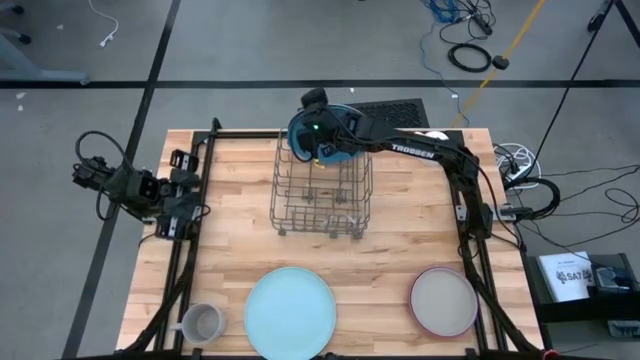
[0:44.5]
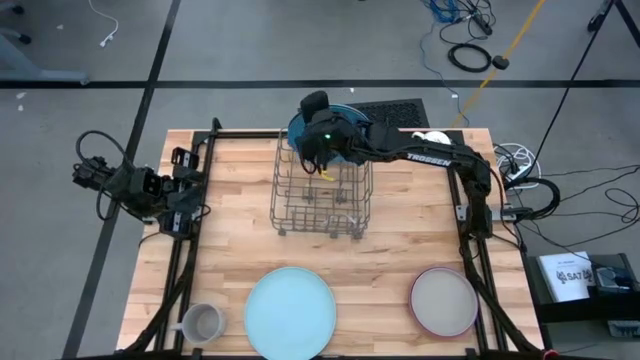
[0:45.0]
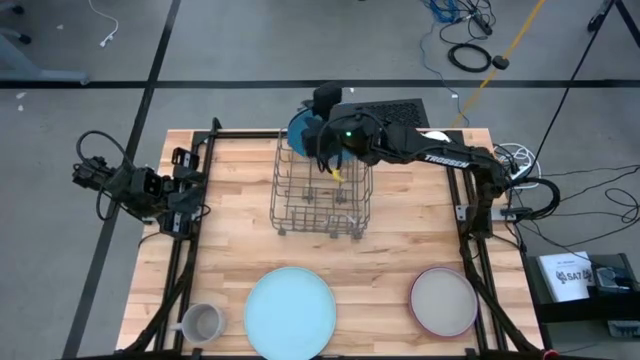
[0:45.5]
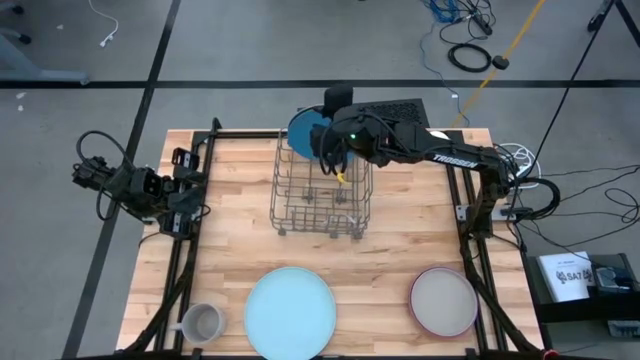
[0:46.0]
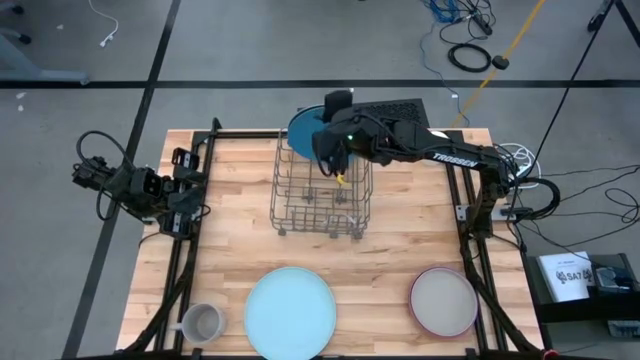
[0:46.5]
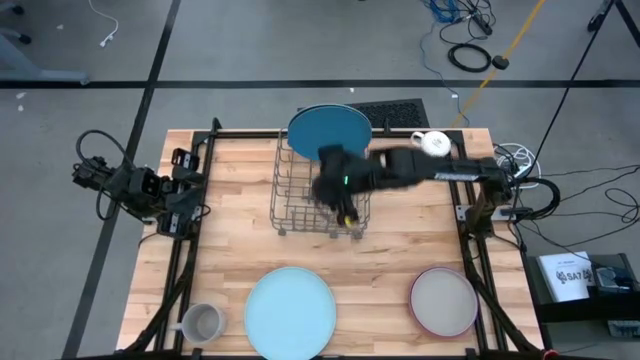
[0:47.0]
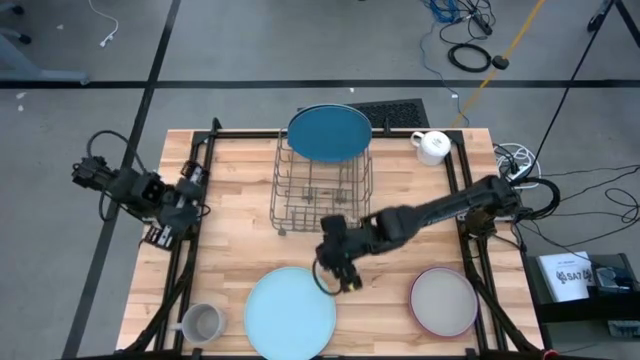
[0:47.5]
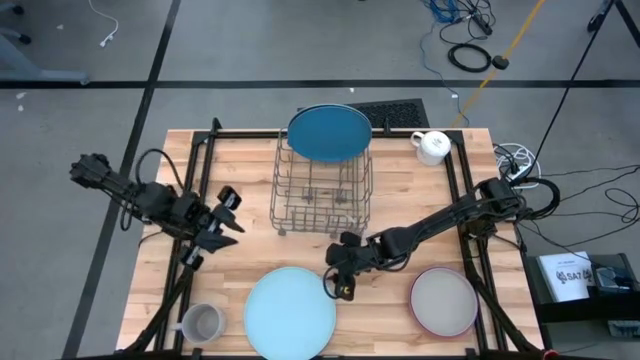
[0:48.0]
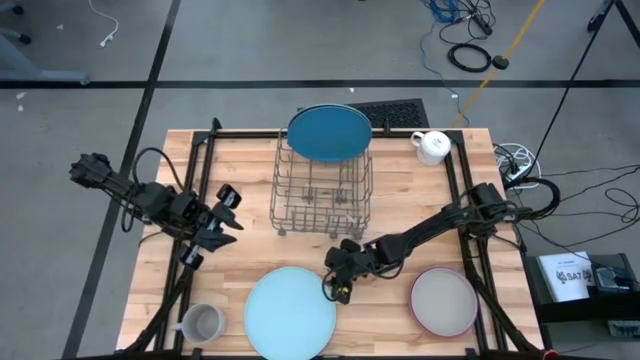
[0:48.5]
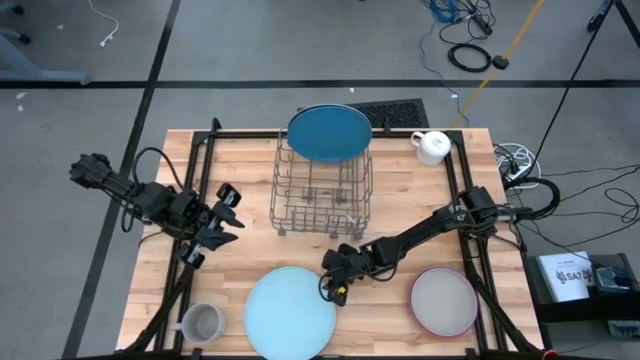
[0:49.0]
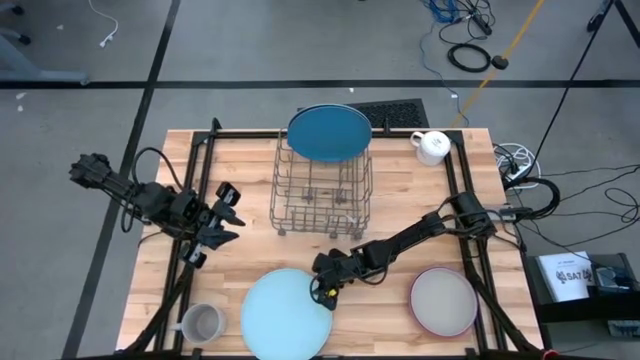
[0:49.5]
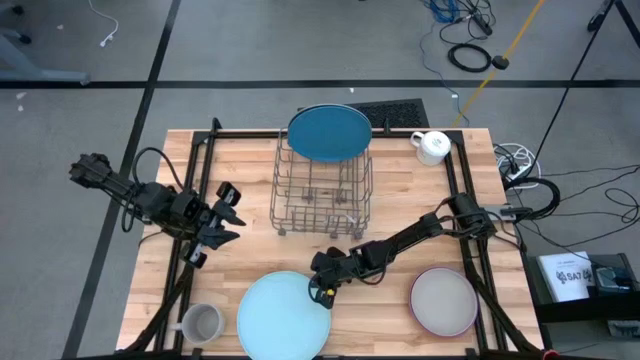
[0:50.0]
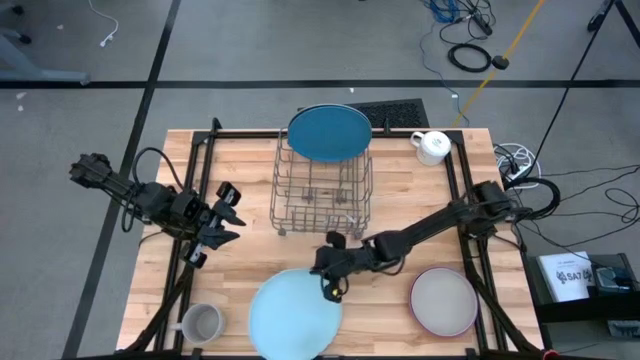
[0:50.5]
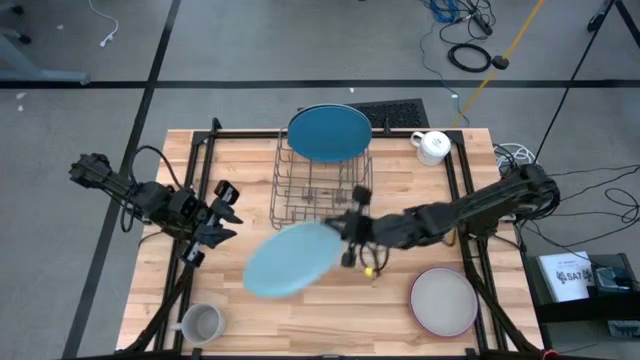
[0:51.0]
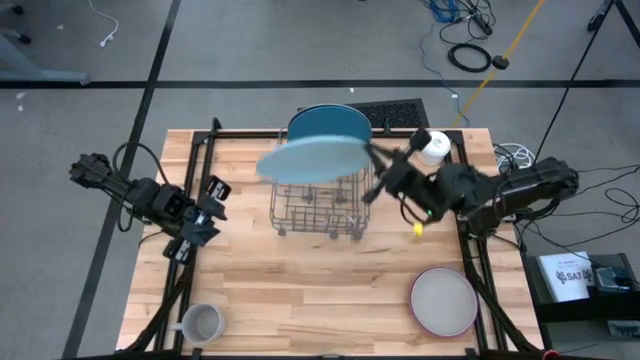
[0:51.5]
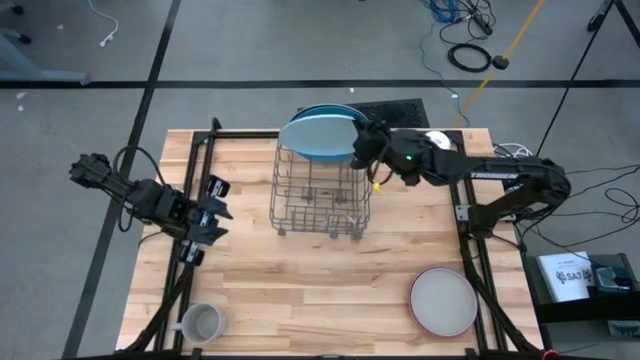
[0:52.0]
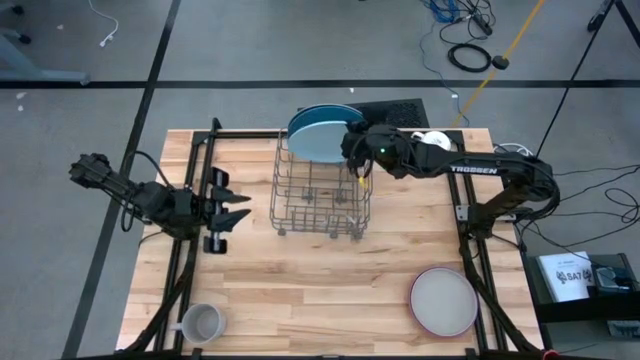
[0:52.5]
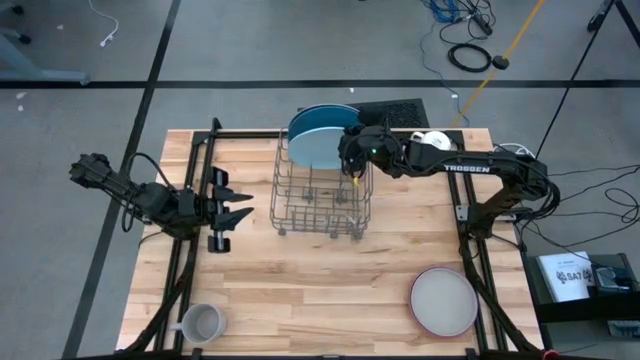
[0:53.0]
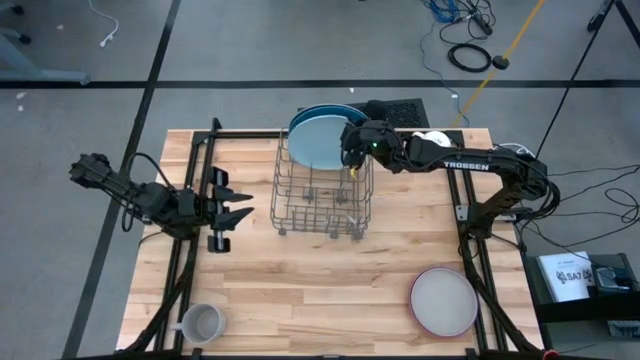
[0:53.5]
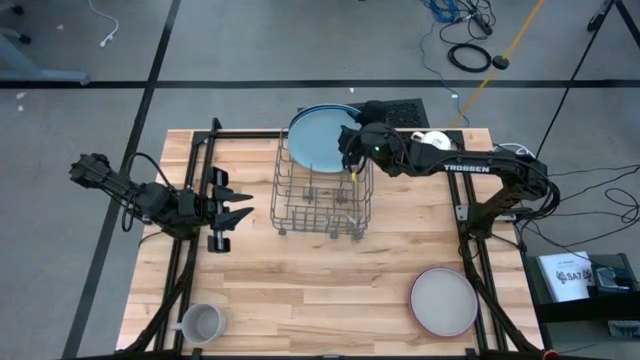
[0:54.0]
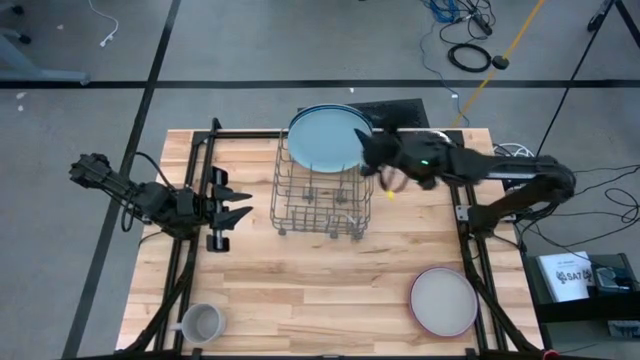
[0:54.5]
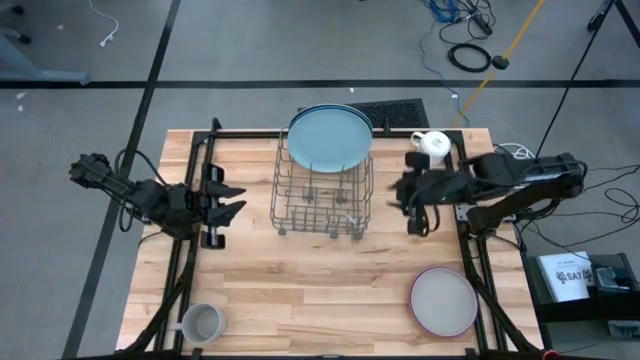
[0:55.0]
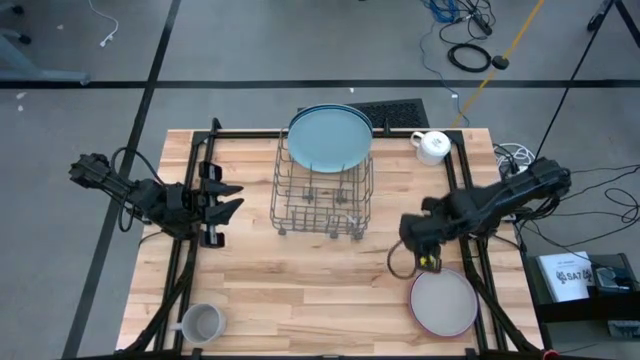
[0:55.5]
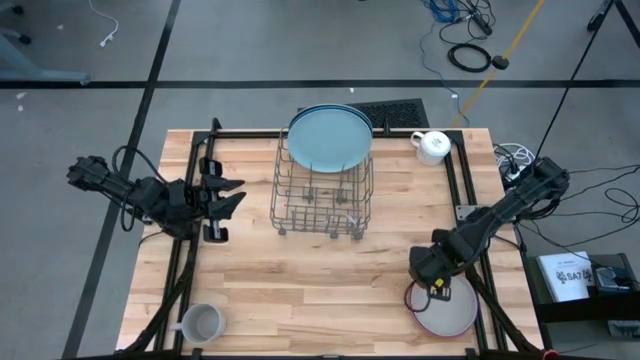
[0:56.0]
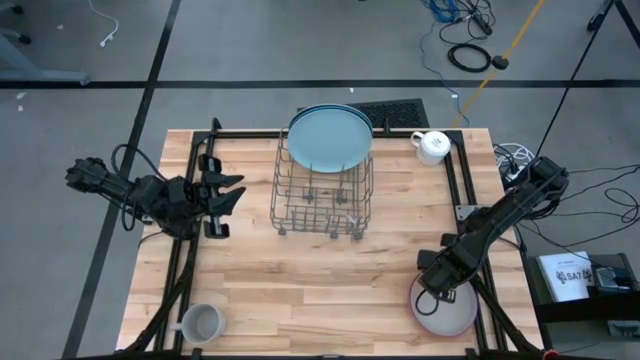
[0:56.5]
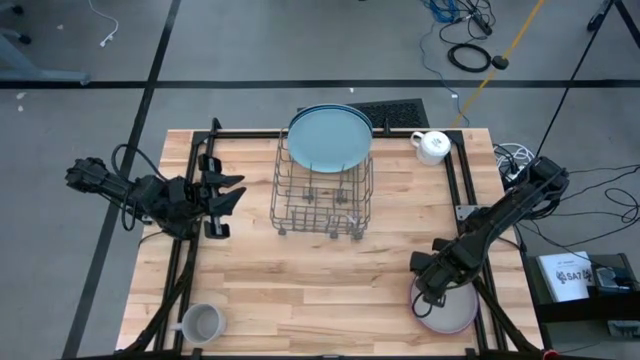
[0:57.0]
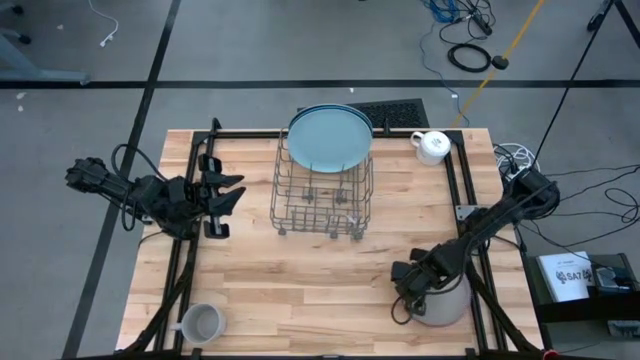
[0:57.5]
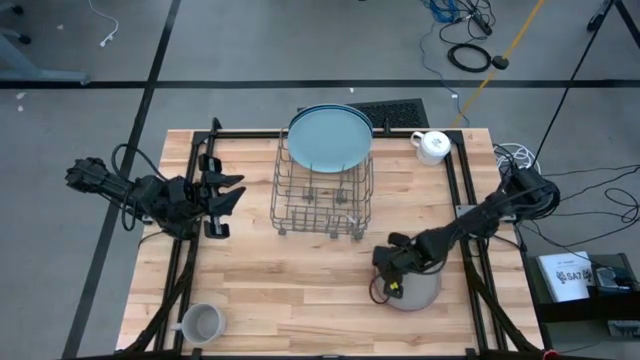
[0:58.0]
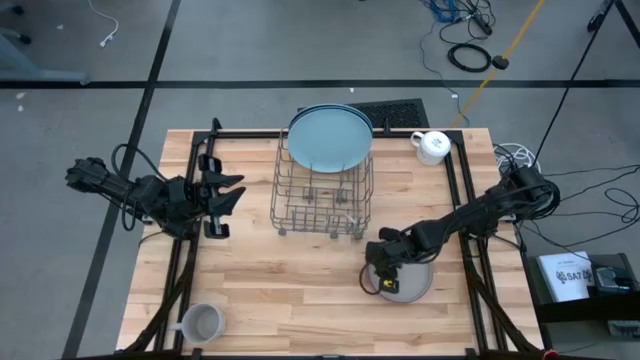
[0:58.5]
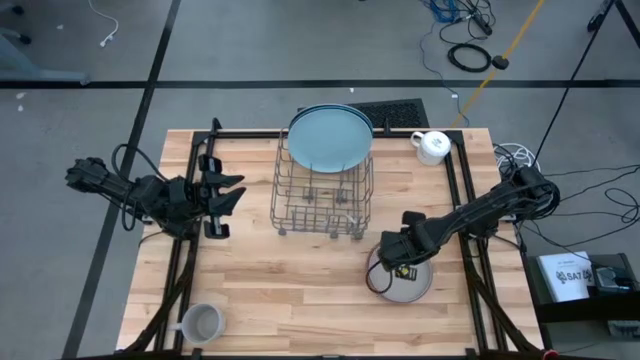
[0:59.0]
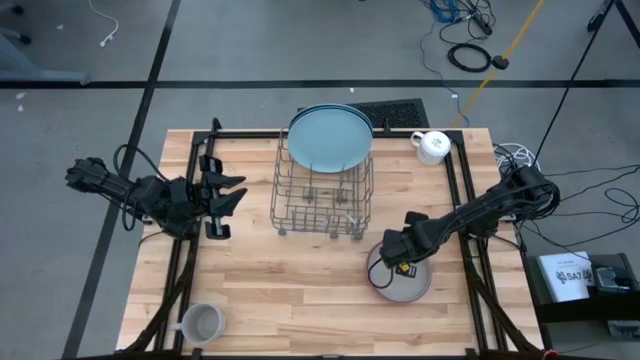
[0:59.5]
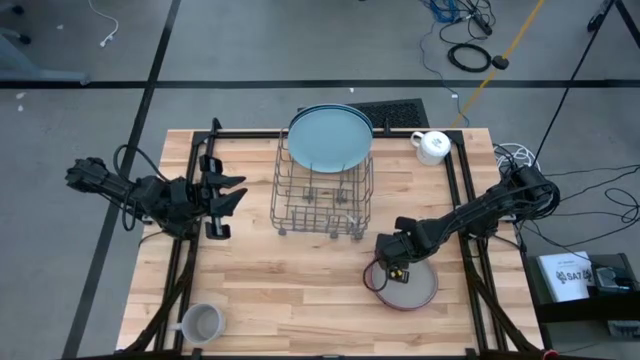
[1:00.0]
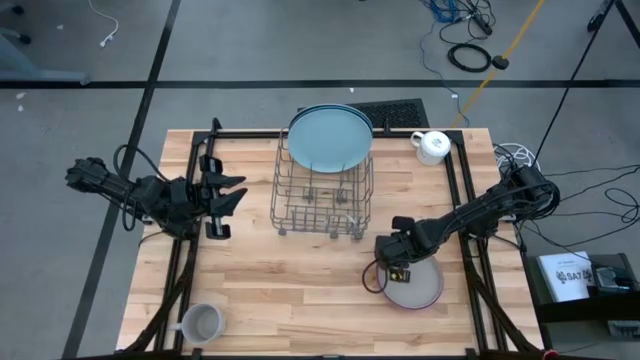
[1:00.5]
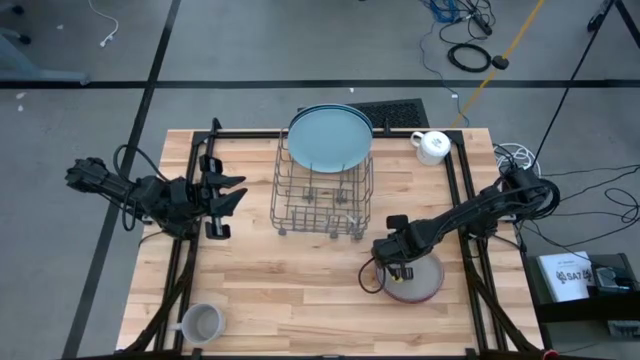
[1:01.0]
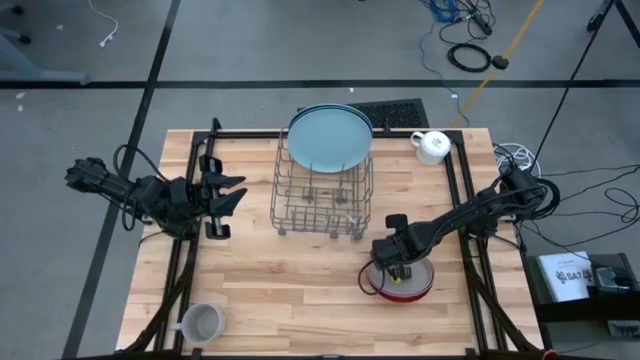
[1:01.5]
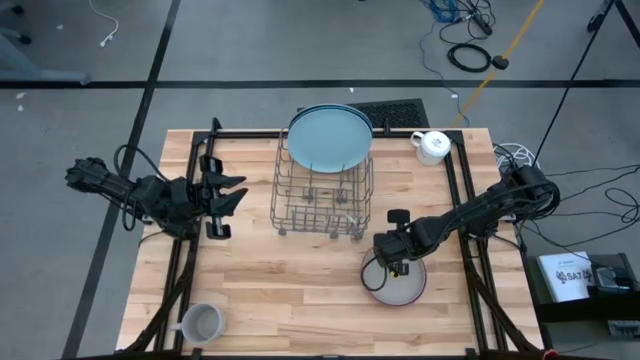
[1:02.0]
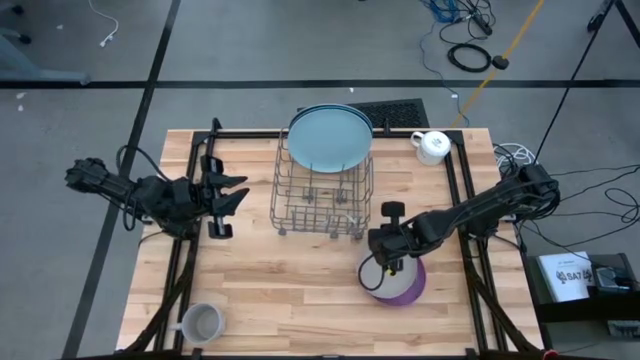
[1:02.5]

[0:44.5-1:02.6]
Task: Sort dishes
Put the light blue plate into the dish rack

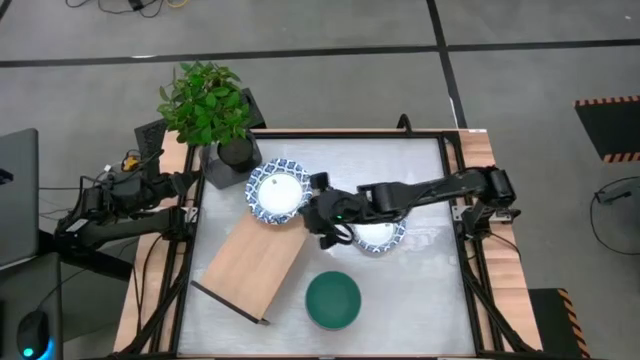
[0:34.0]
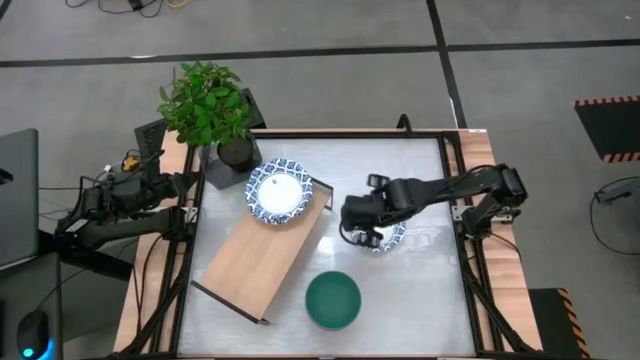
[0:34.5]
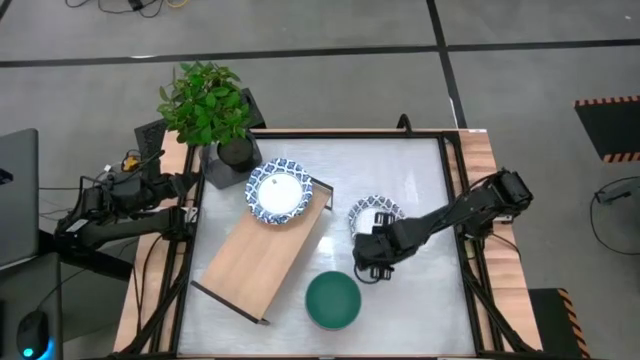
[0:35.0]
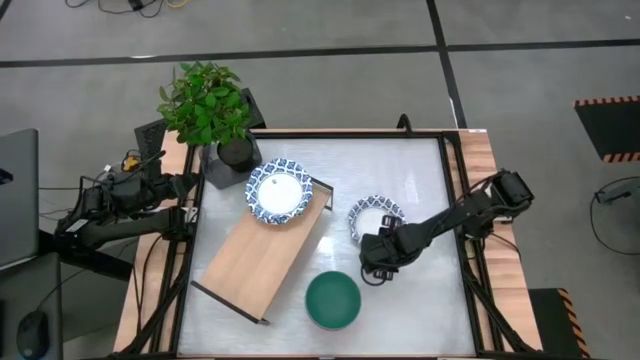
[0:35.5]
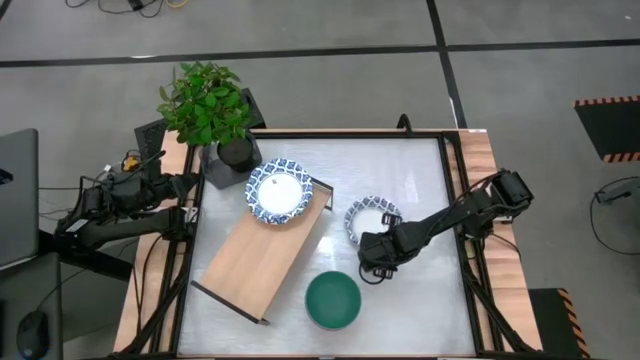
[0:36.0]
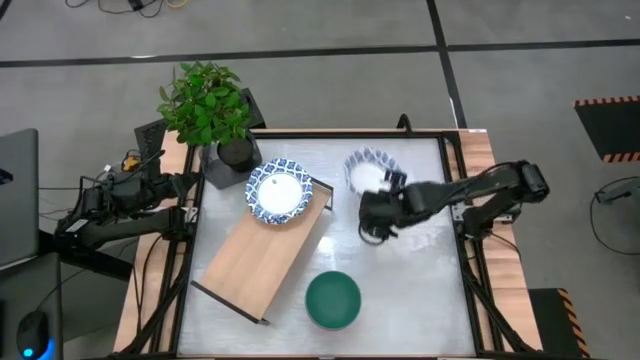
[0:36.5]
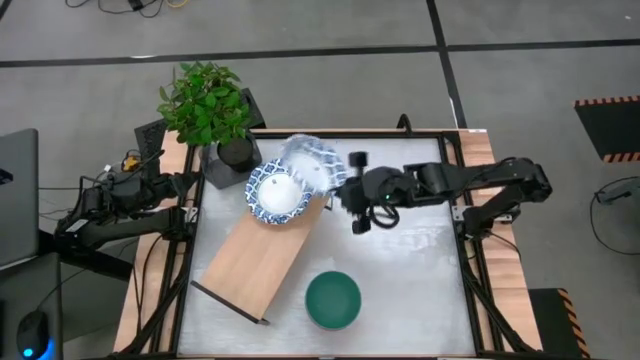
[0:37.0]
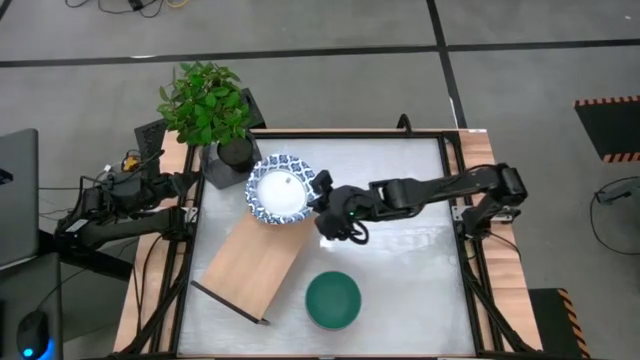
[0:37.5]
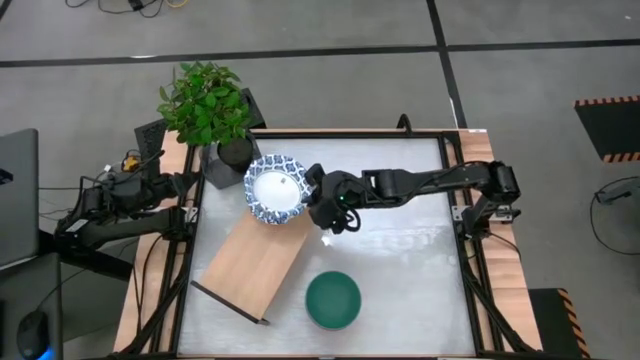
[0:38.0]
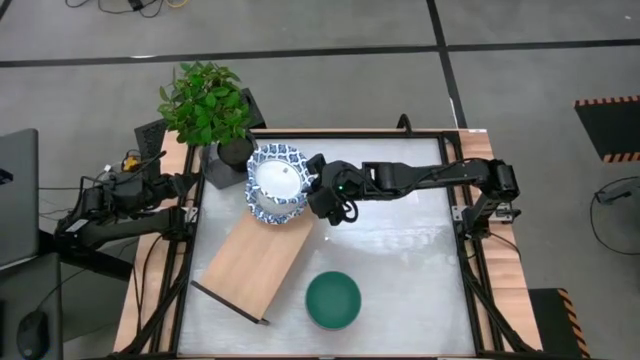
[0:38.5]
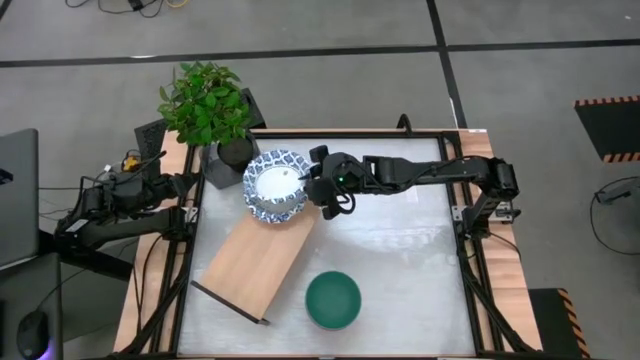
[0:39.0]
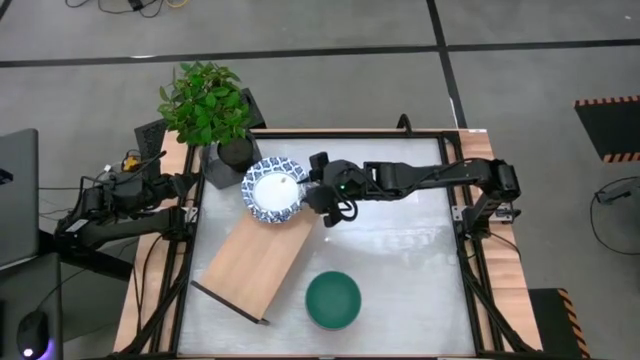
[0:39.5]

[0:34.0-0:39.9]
Task: Place and stack bowls onto a shelf
Stack the white patterned bowl on the white patterned bowl on the shelf
